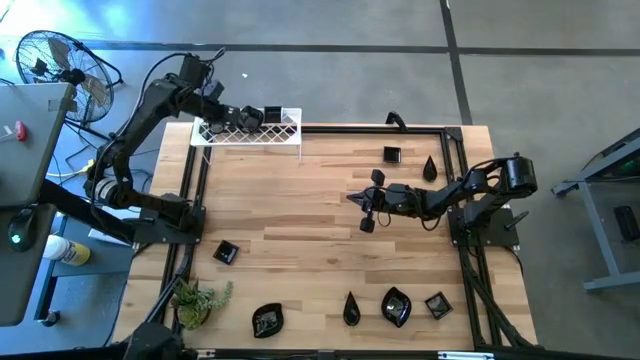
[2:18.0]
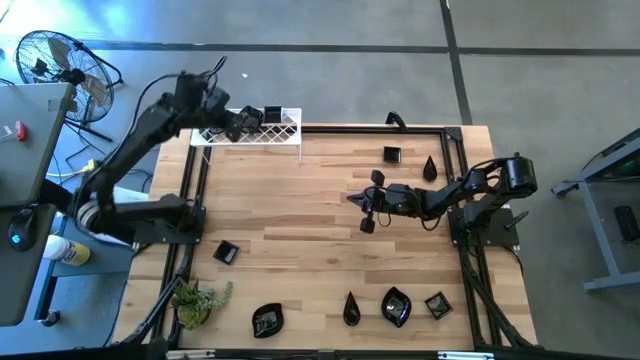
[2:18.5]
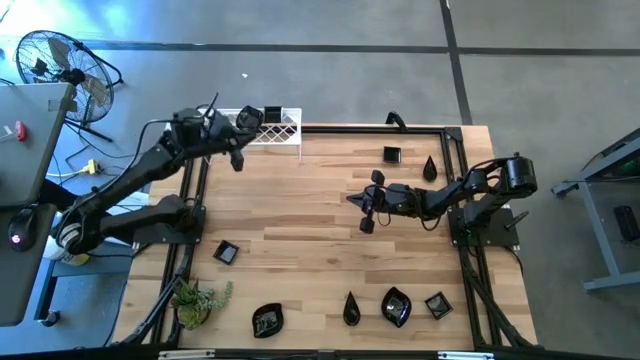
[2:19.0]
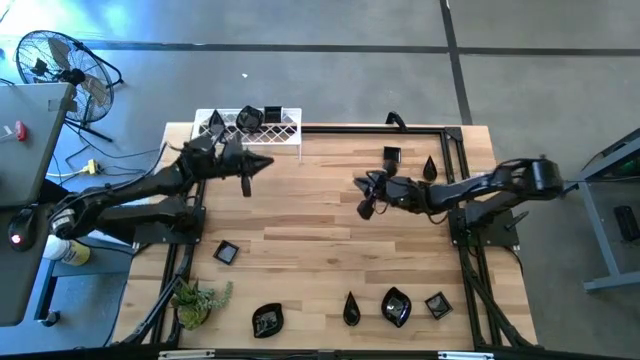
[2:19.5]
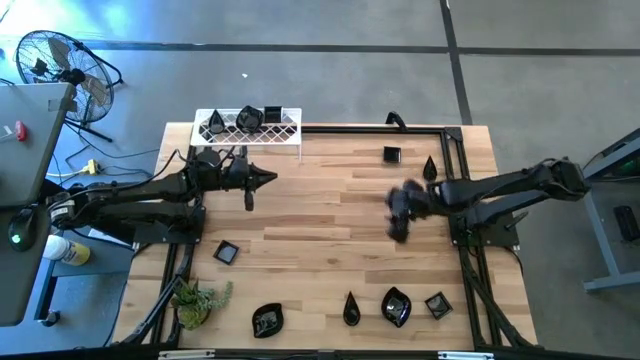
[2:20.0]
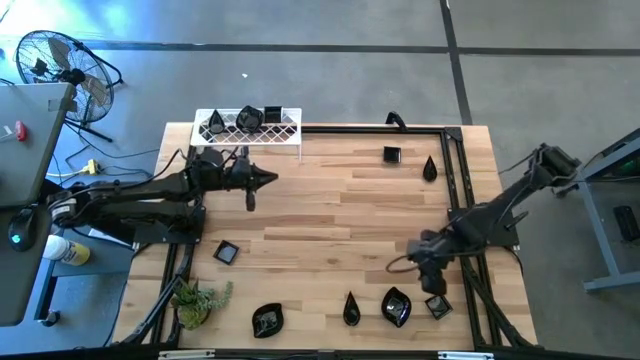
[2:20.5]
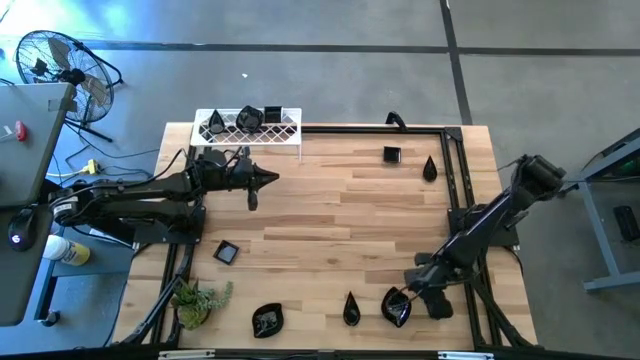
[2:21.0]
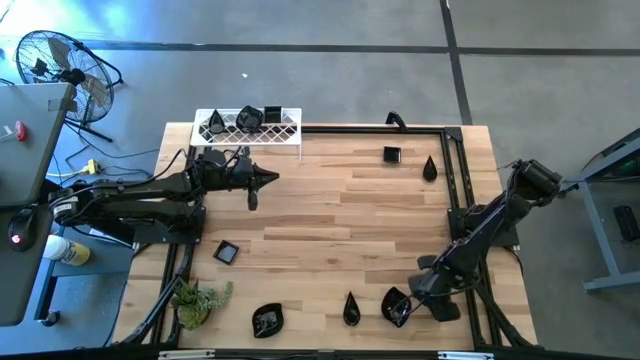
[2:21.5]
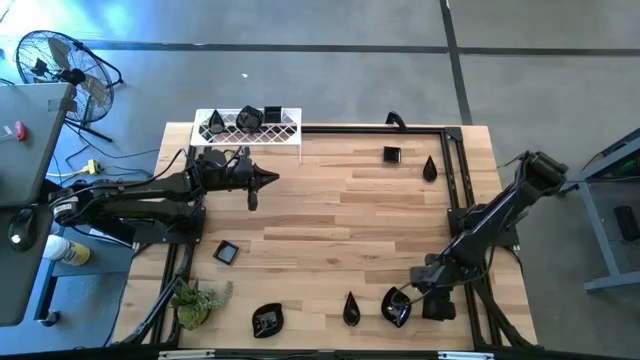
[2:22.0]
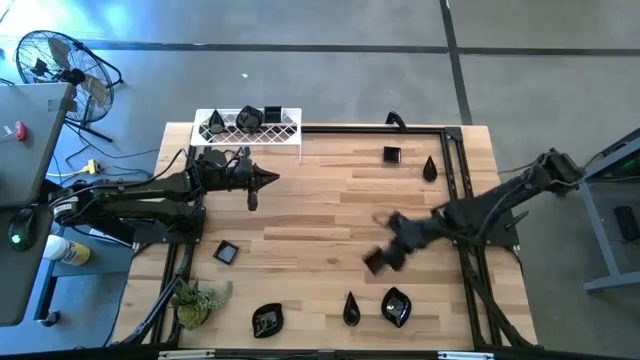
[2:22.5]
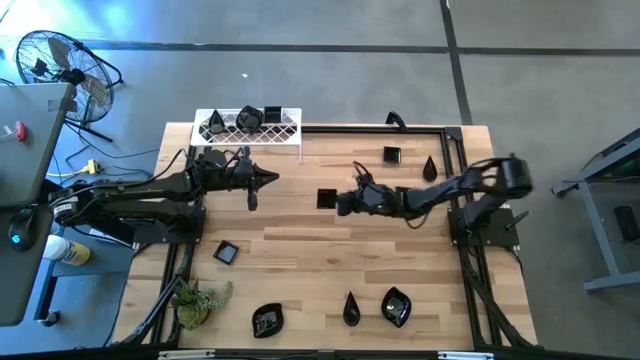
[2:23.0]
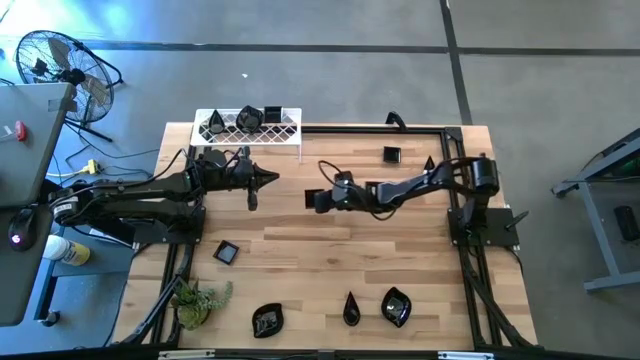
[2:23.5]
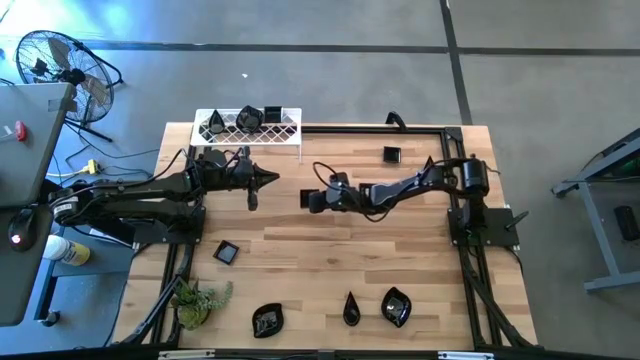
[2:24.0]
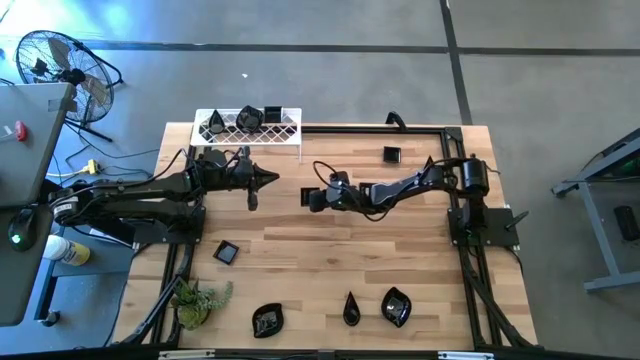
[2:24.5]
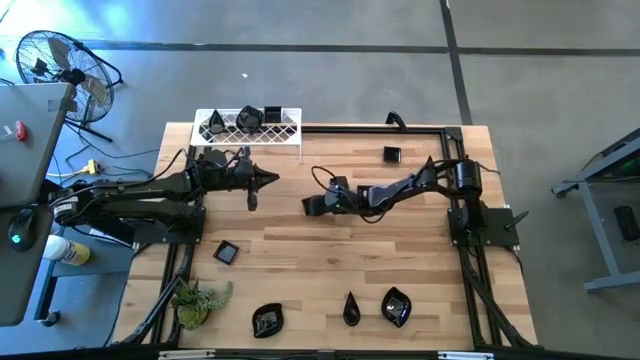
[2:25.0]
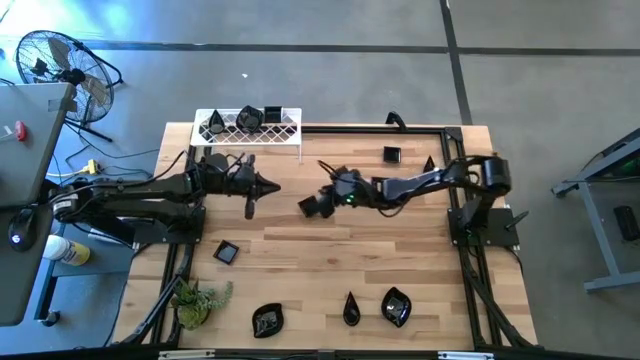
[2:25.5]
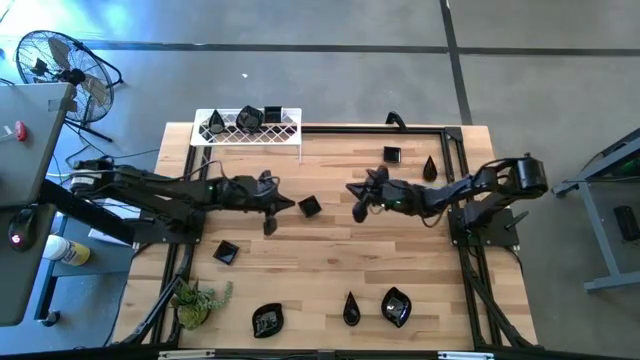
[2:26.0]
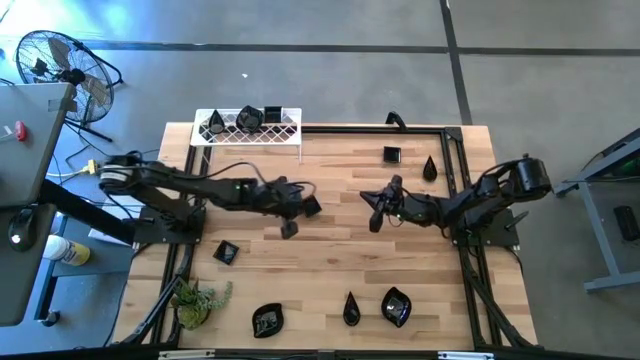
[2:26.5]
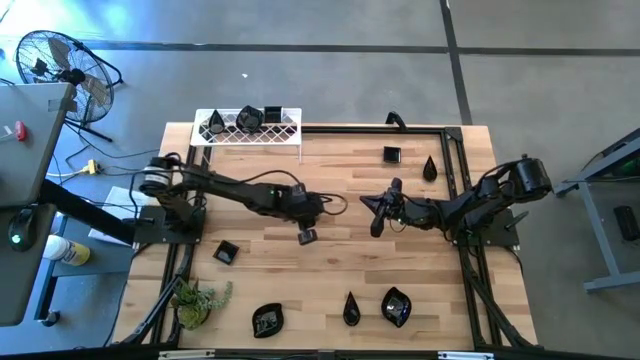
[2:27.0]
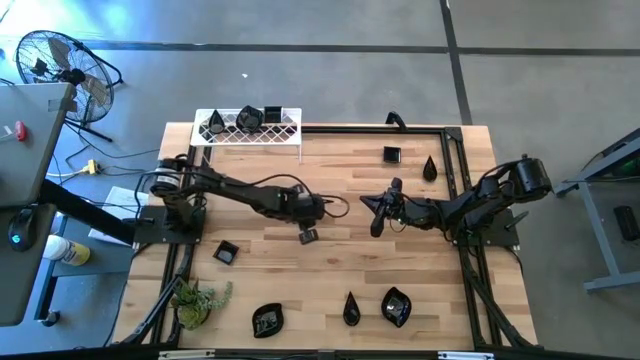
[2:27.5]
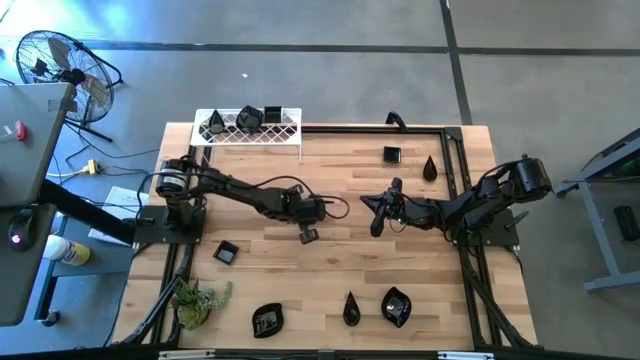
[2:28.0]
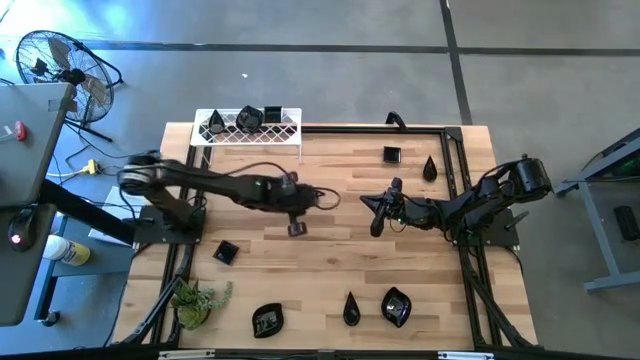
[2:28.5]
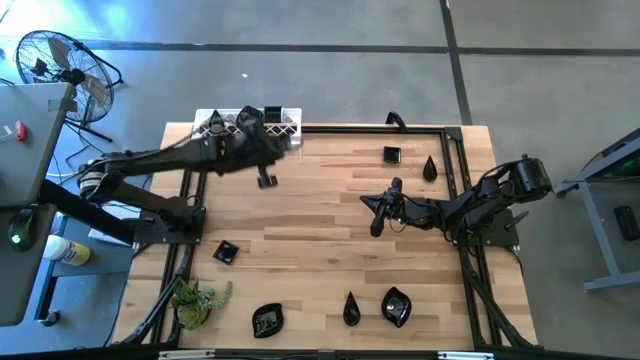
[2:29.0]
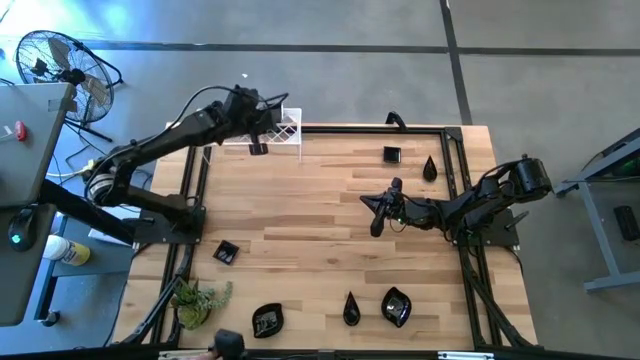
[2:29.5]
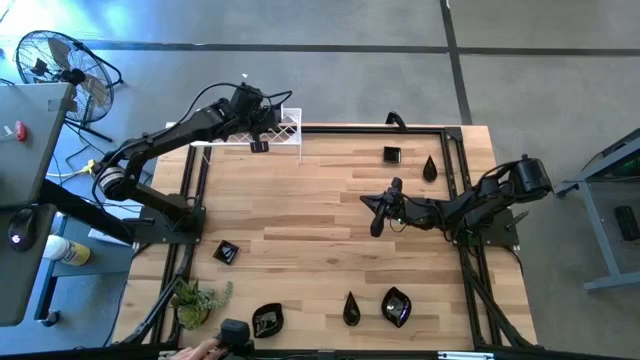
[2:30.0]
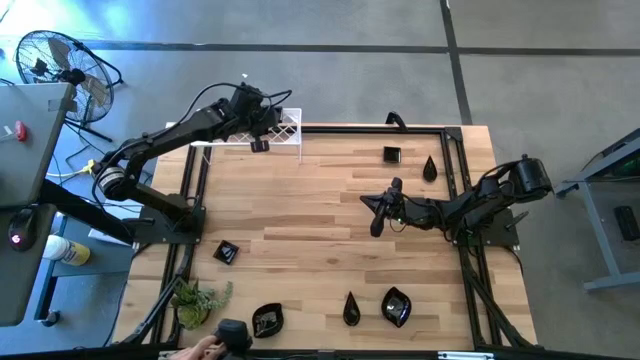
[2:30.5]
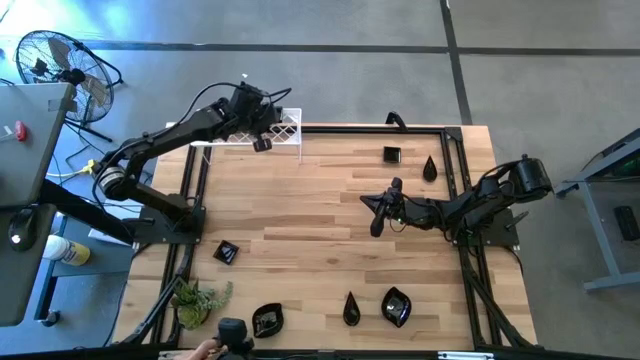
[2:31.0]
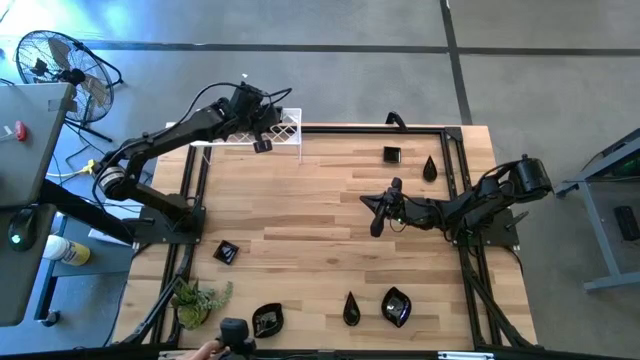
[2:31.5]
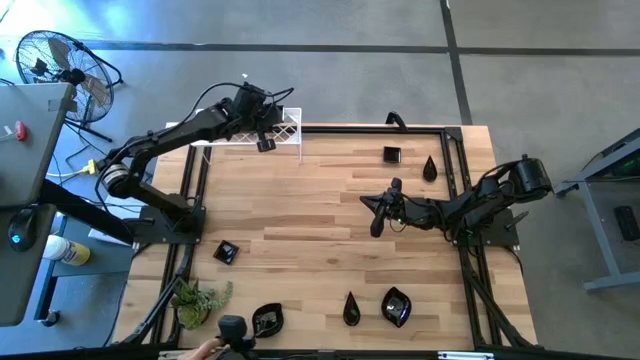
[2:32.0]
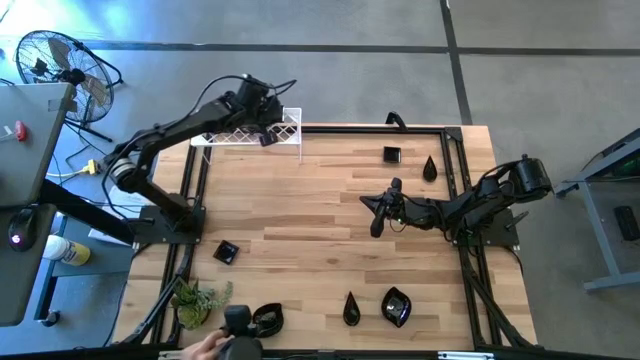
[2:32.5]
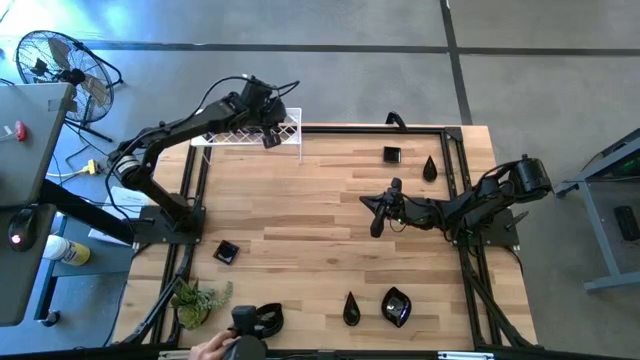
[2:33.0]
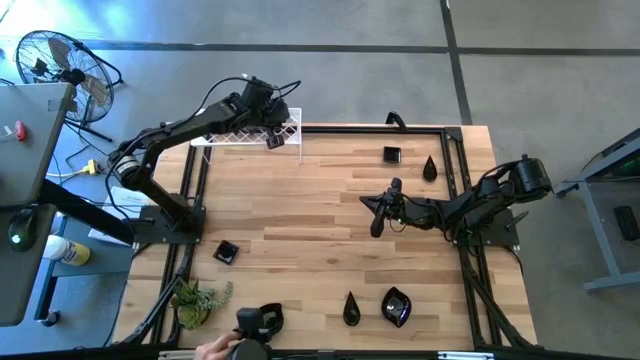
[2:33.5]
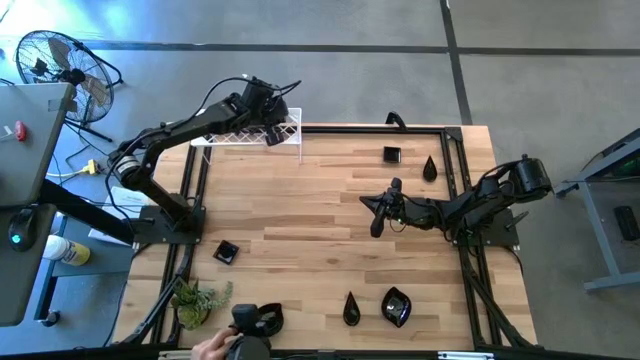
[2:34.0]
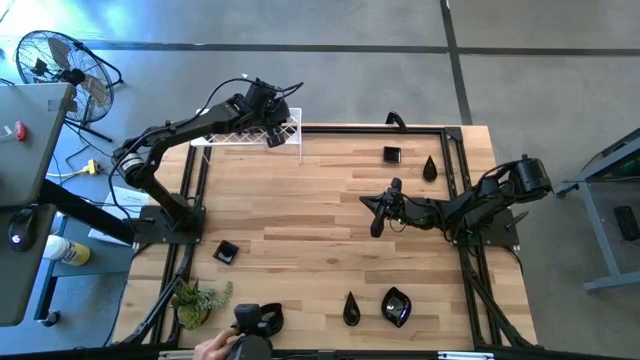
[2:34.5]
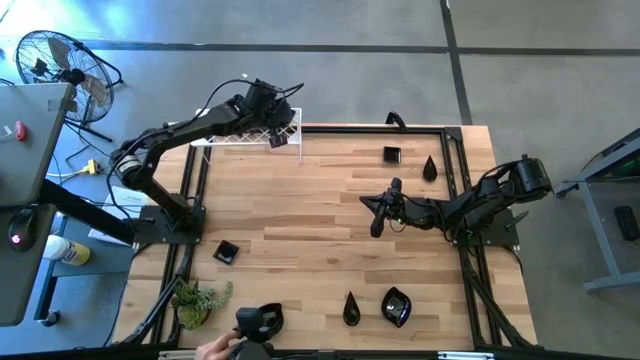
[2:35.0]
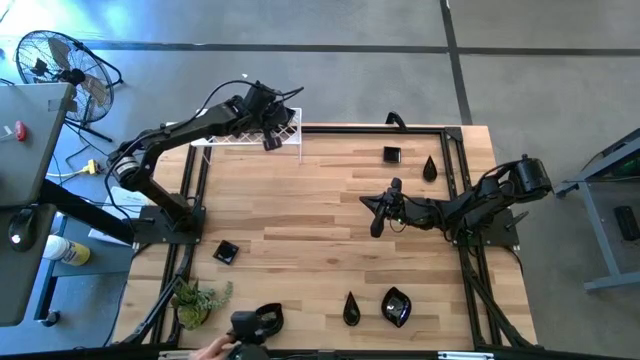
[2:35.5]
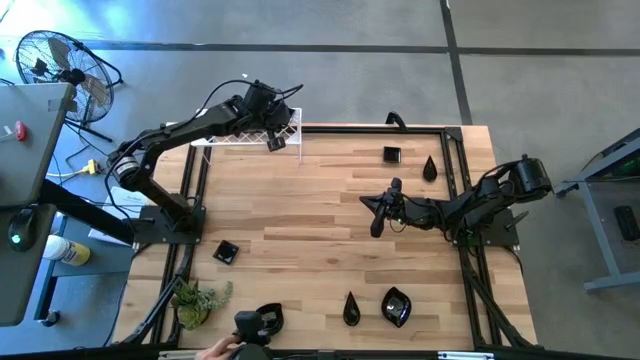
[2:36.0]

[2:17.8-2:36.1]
Task: Pick & Place Mini shaped plates
Stack the bottom right square plate on top of the stacked square plates on the shelf

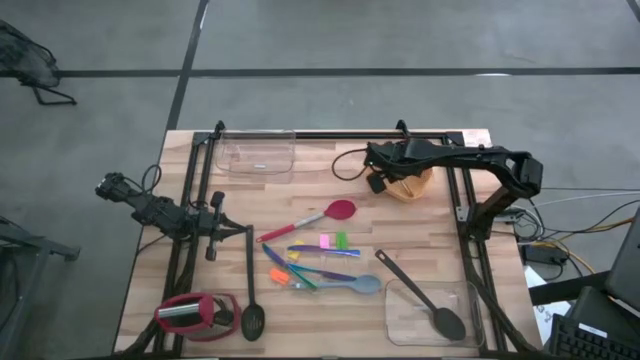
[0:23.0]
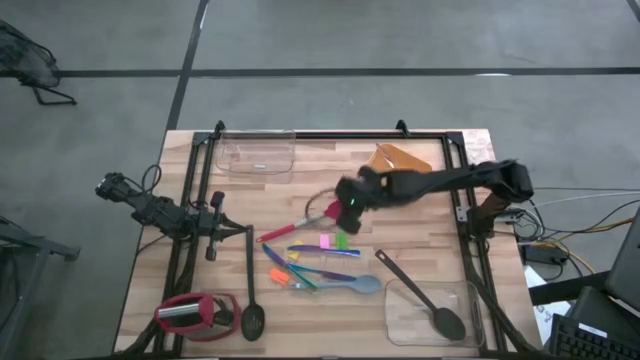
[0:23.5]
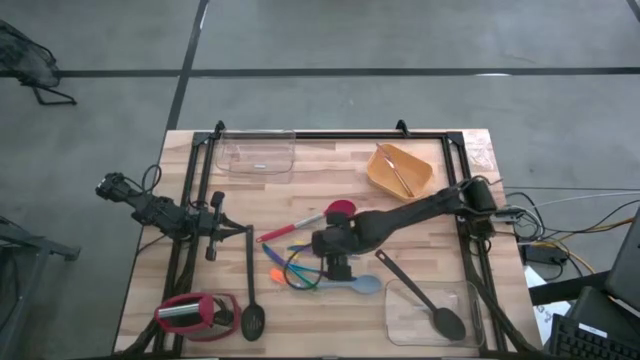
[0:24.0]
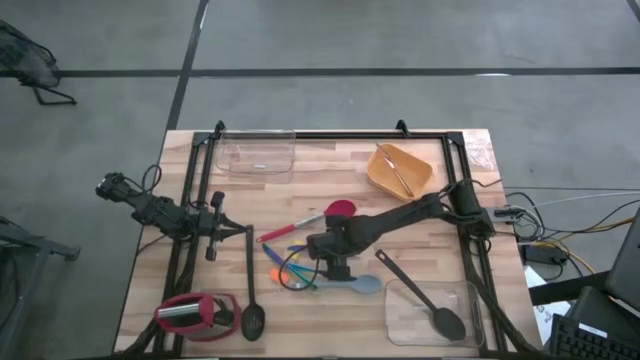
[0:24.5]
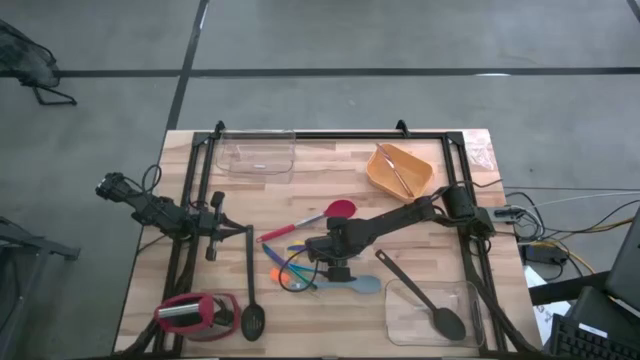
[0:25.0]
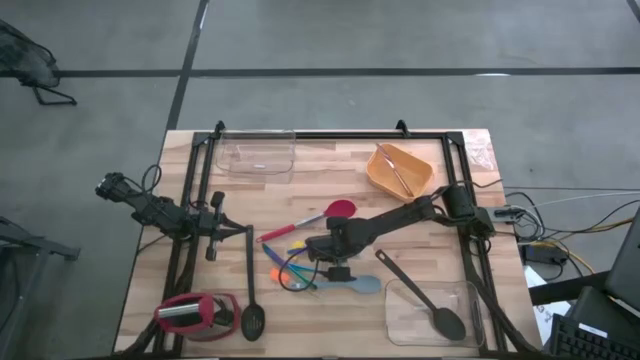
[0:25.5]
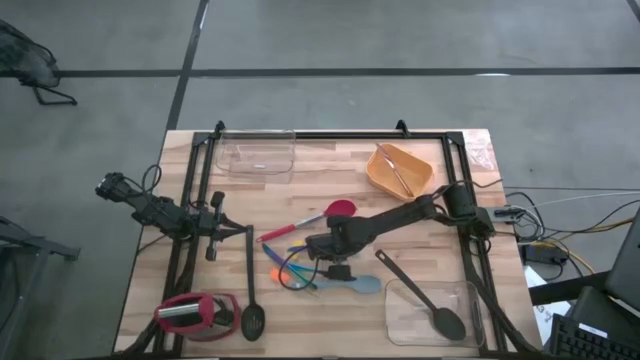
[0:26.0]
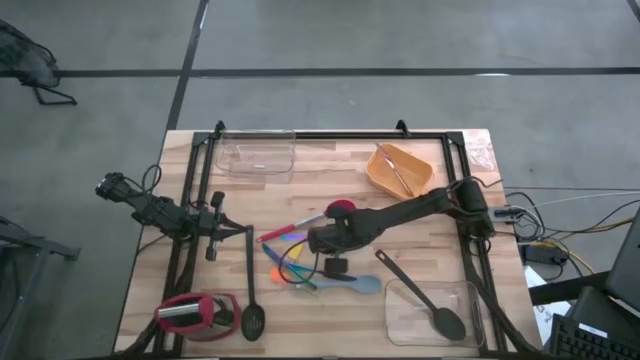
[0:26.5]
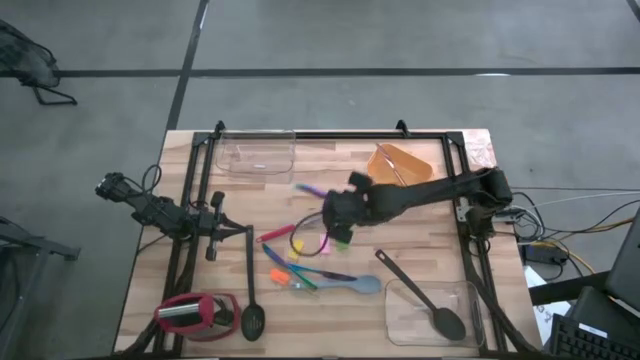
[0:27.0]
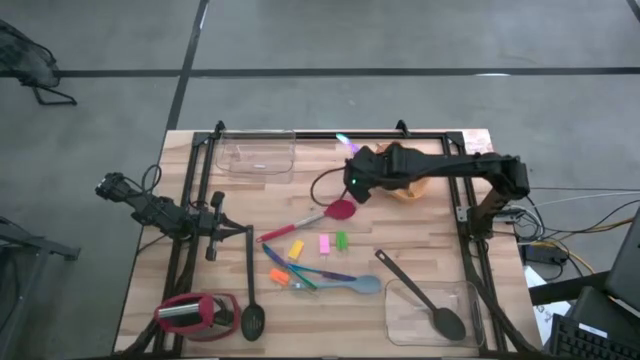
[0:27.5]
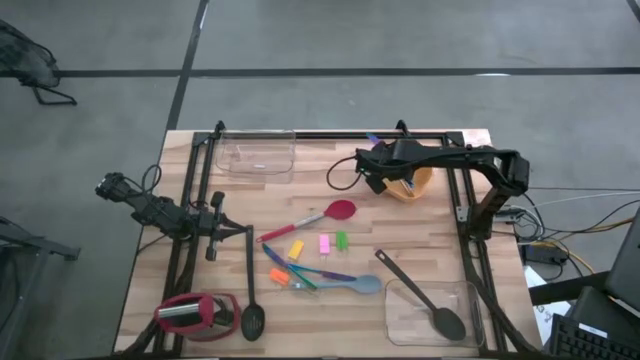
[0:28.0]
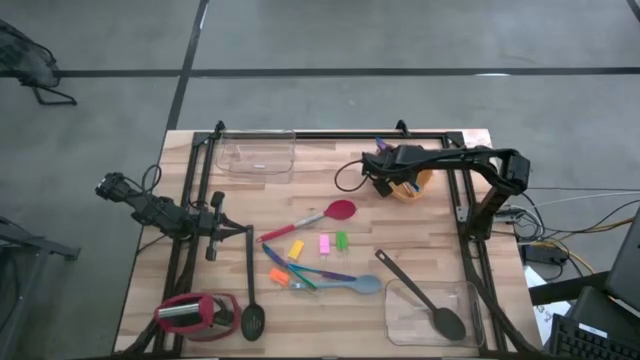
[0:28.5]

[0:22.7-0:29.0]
Task: Pick & Place Kitchen Items
Put the blue knife into the yellow bin
